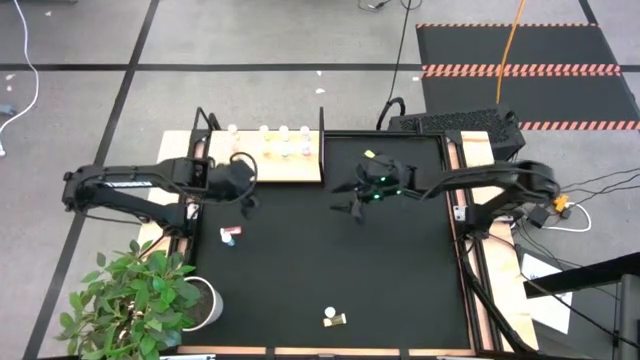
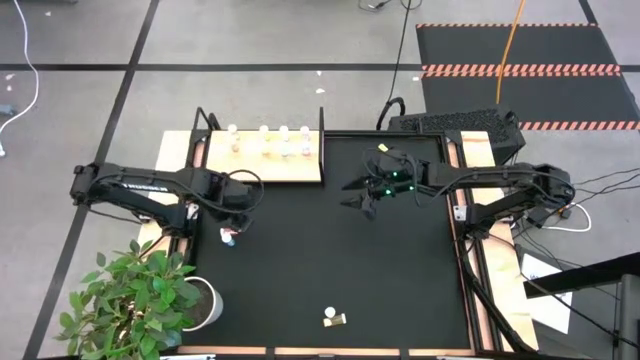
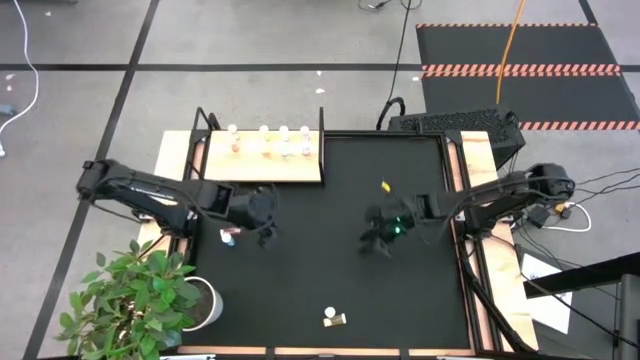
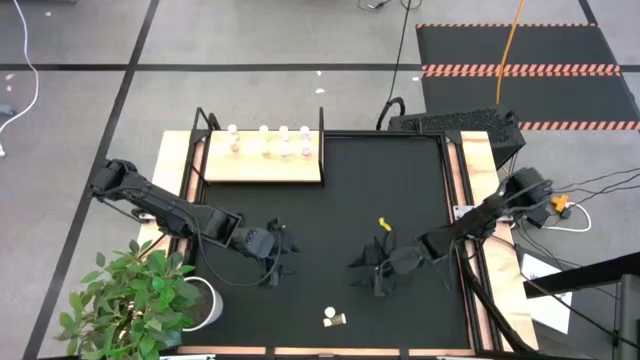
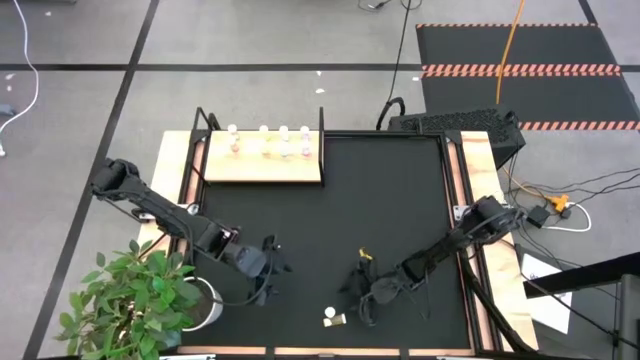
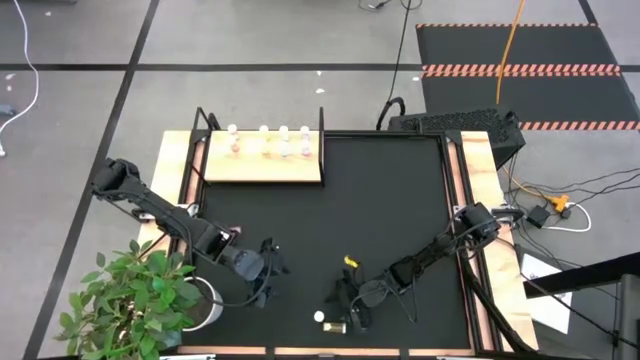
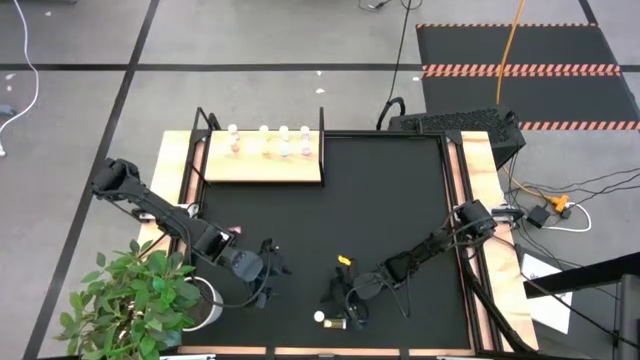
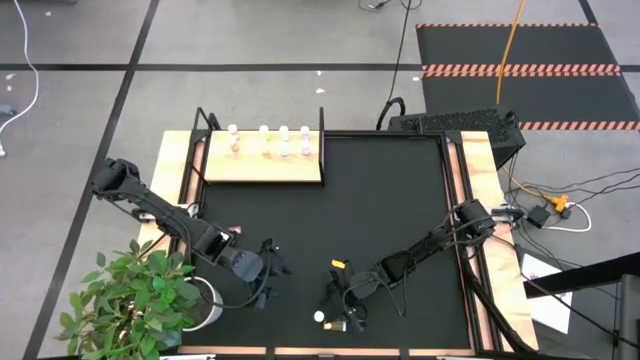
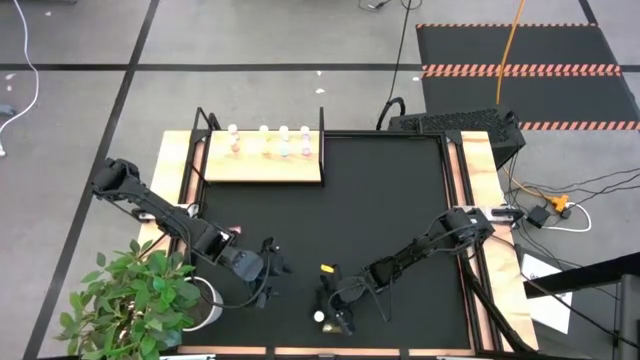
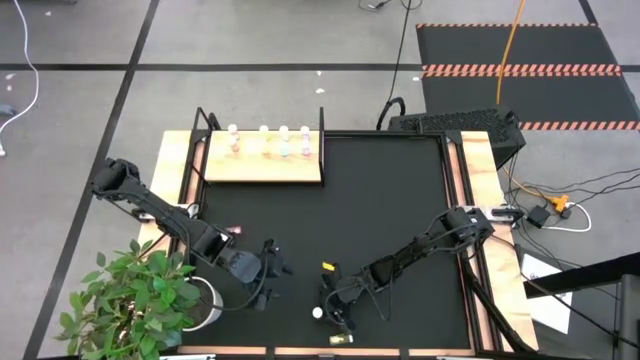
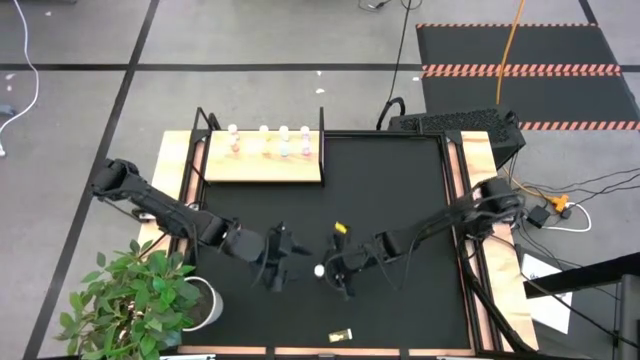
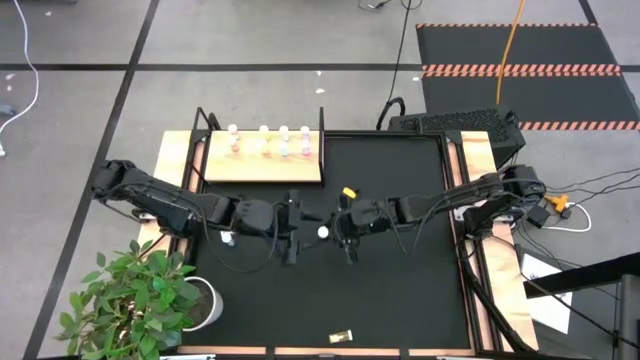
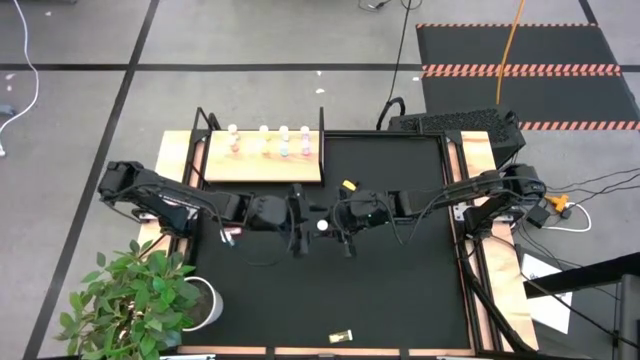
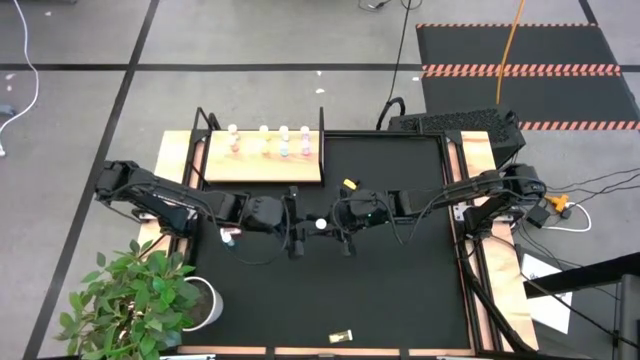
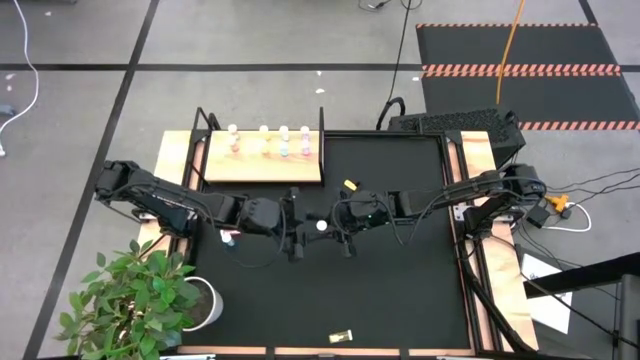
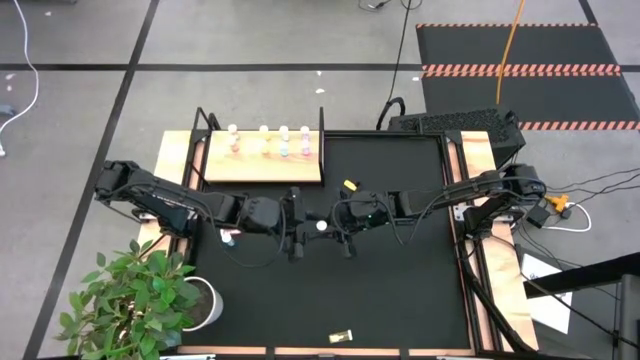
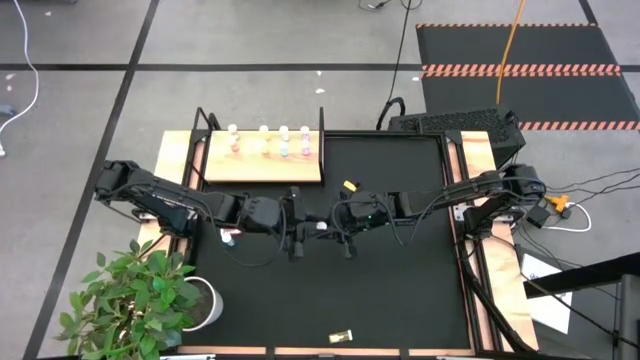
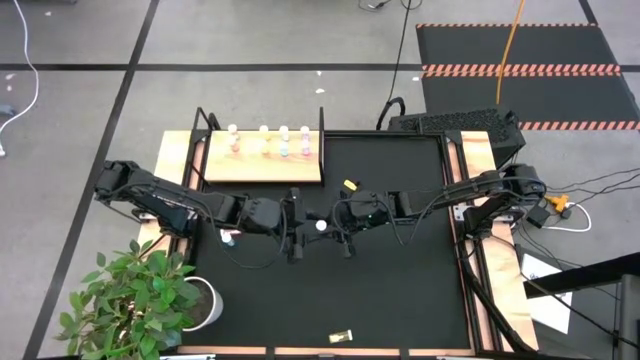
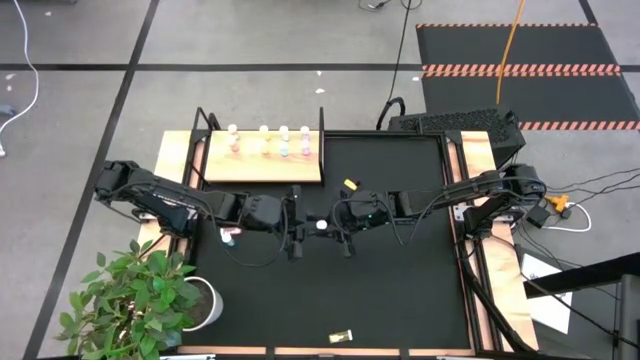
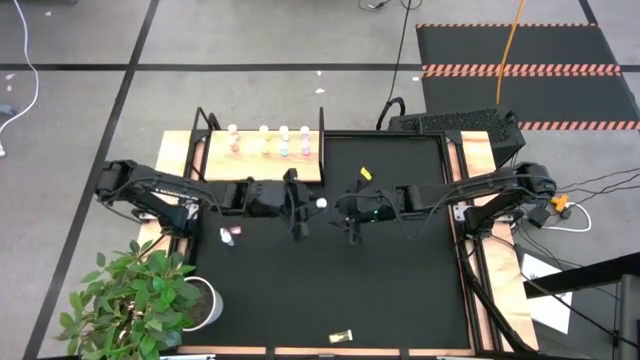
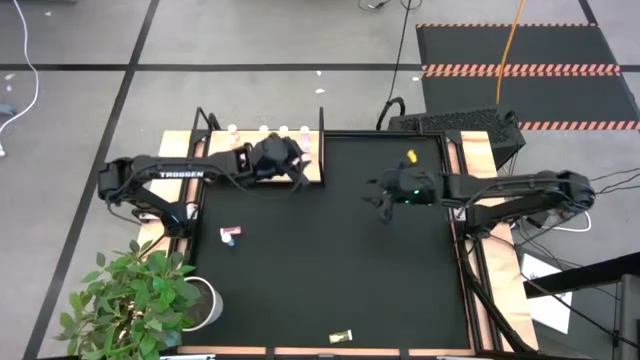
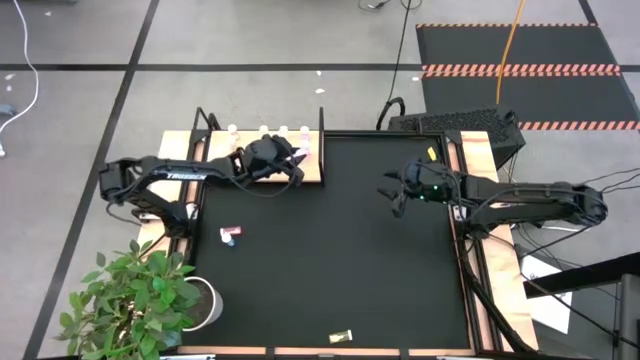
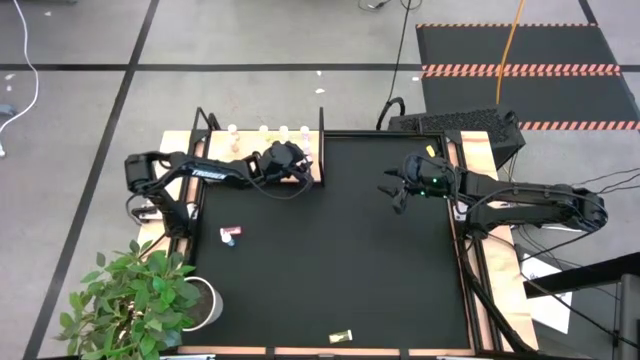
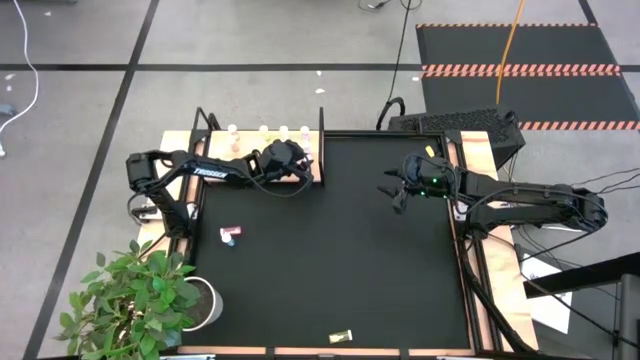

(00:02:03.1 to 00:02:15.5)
Task: Pick and place medicine bottles onto shelf by color
Put the purple pill bottle on the shelf aligned with the other purple pill bottles

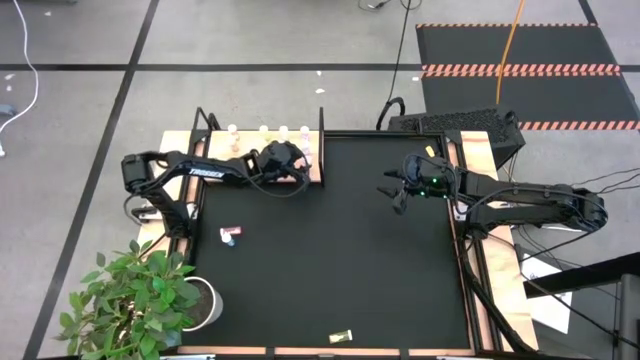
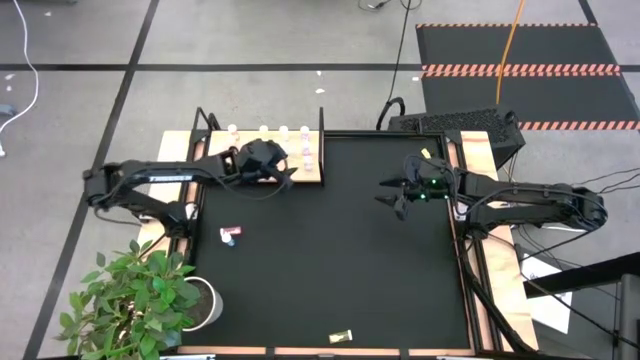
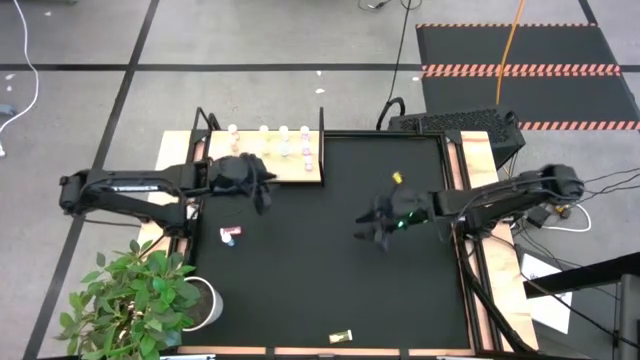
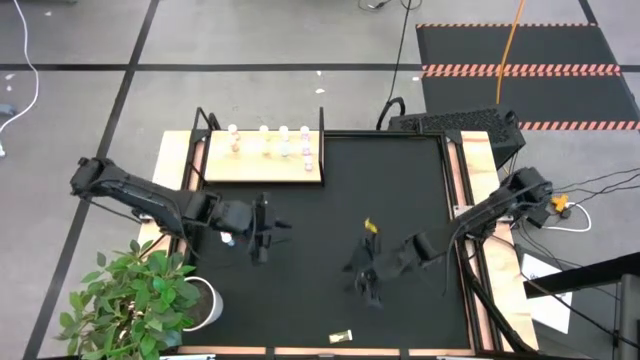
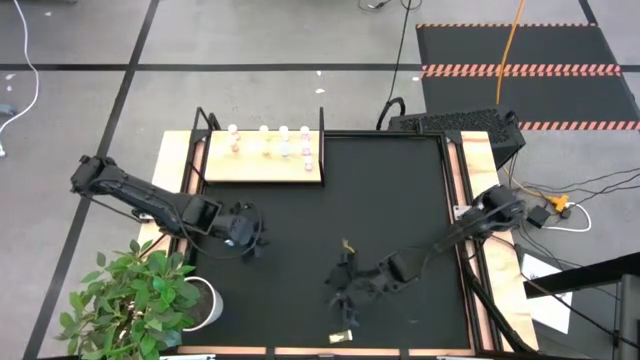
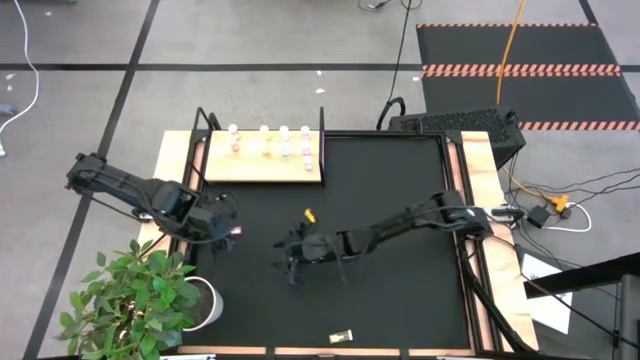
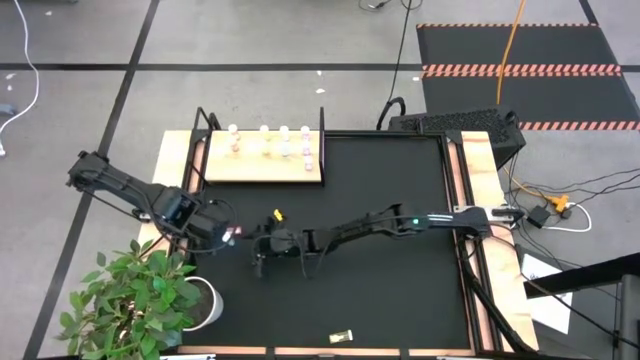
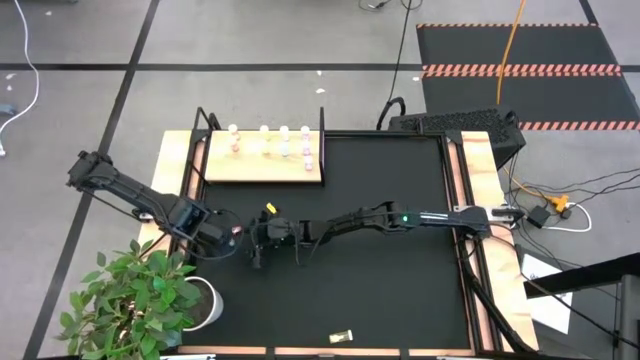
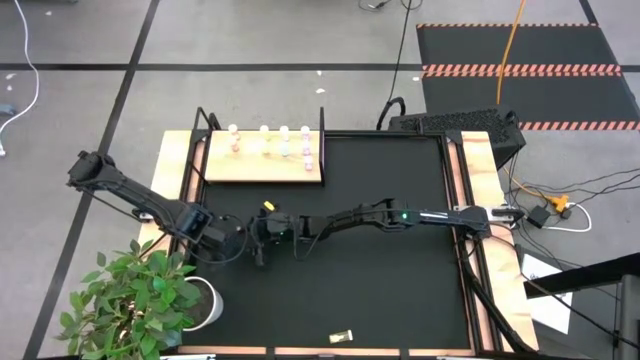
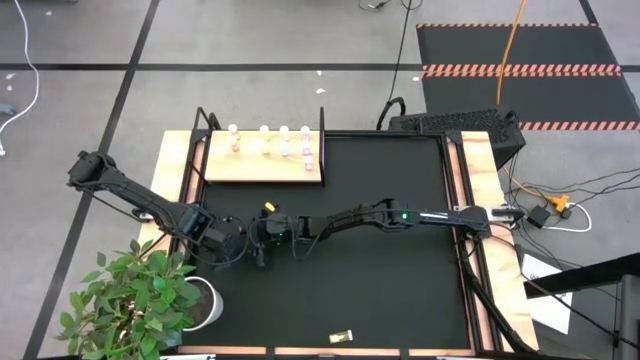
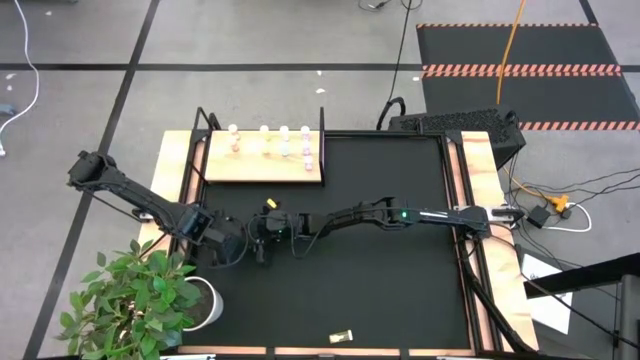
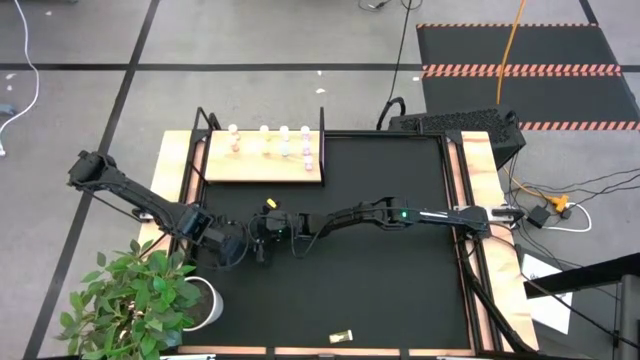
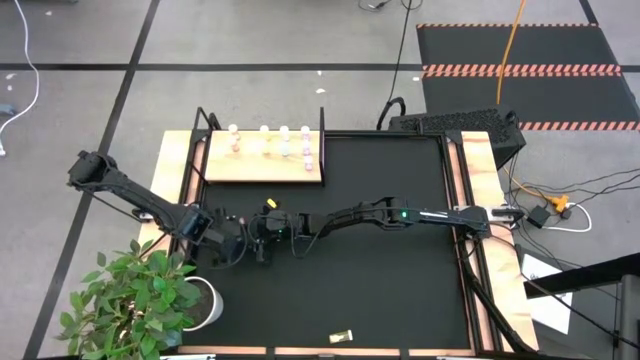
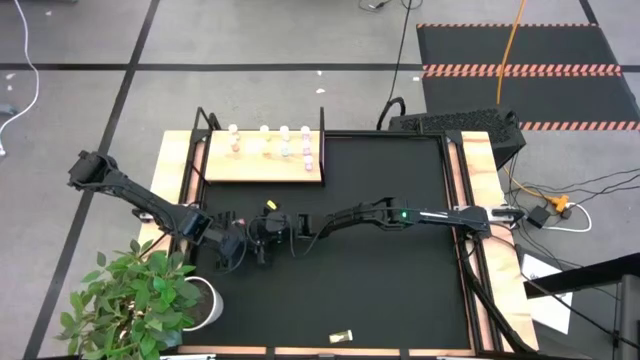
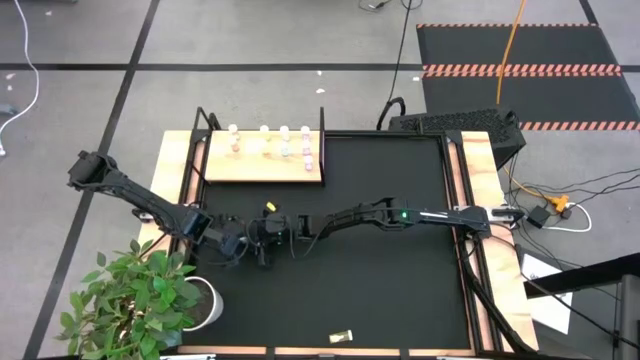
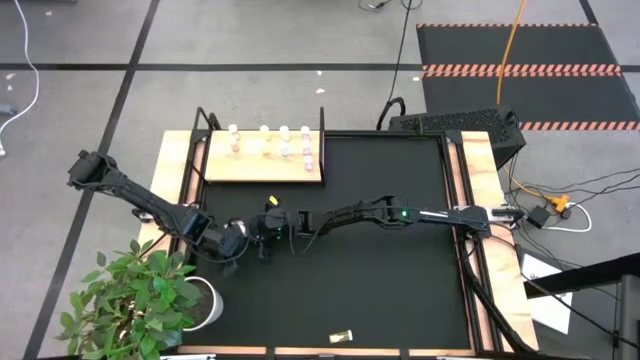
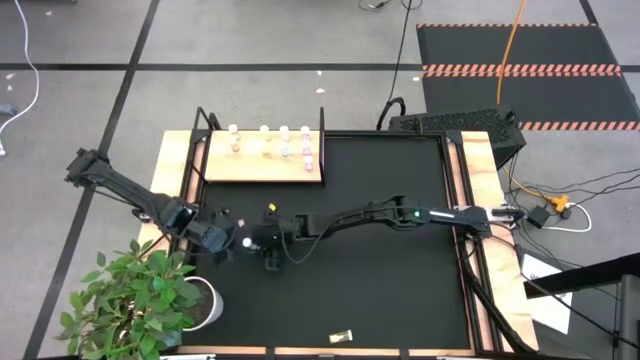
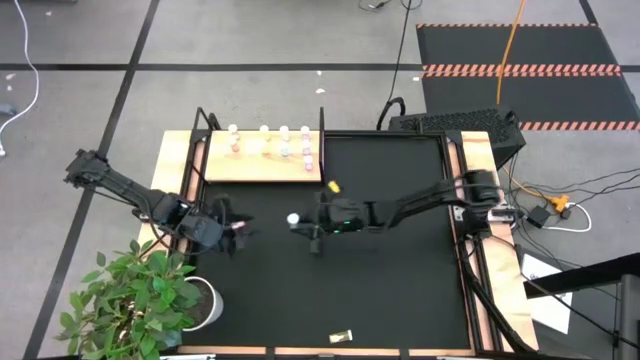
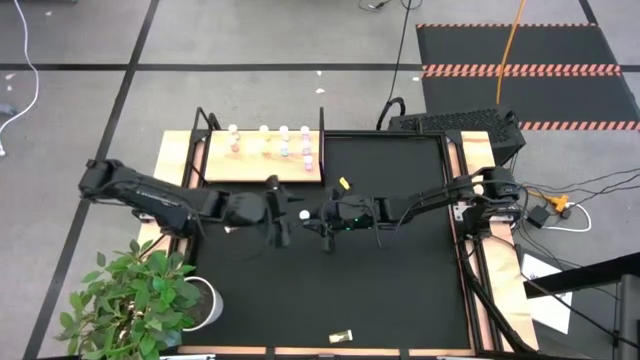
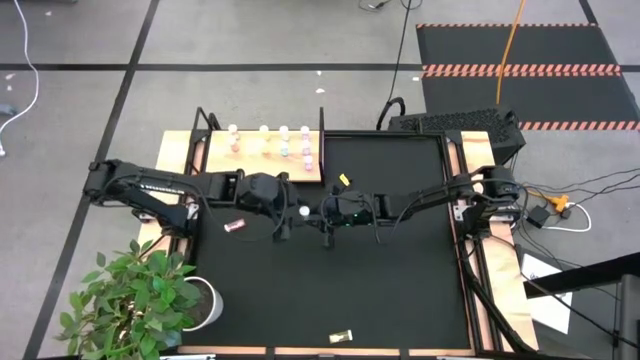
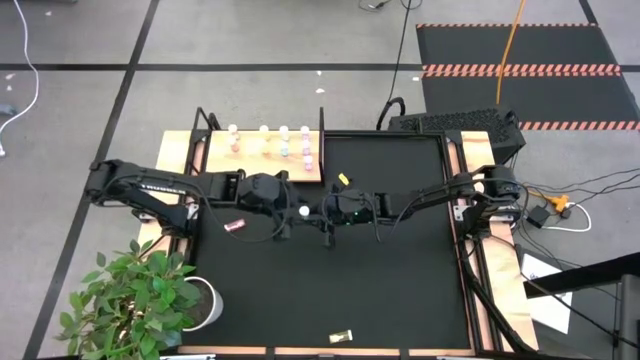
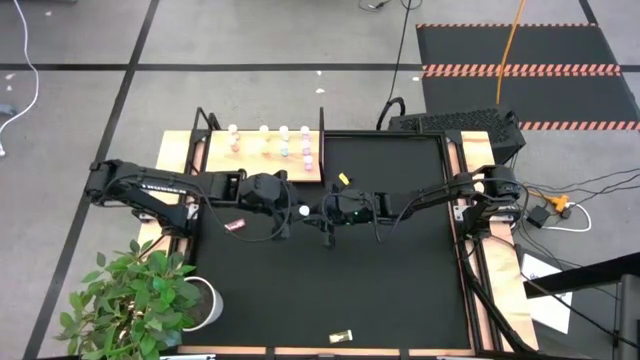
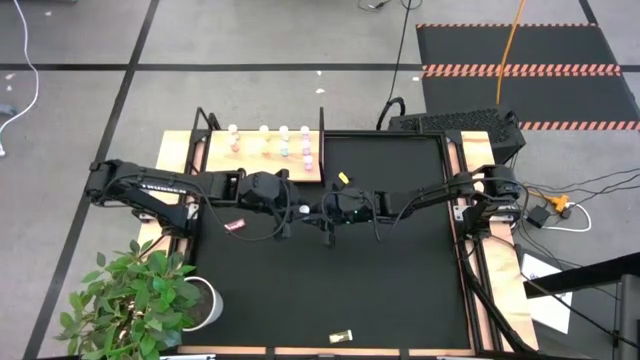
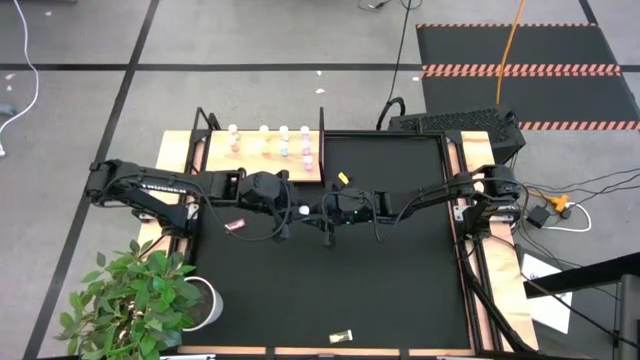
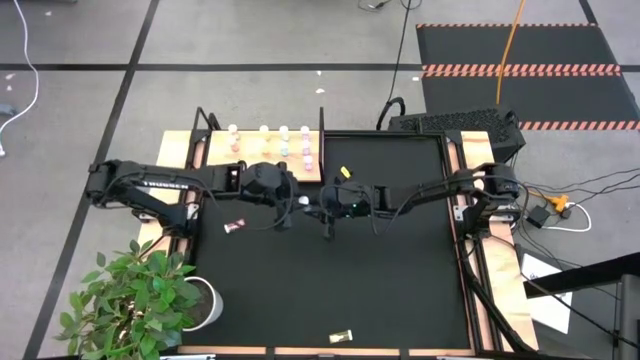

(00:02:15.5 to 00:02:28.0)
Put the blue pill bottle on the shelf aligned with the other blue pill bottles
